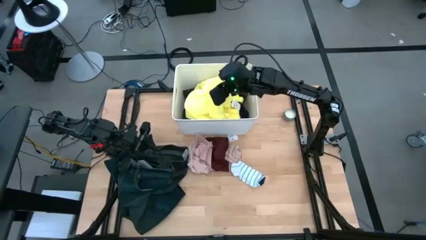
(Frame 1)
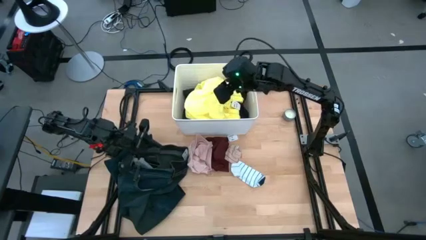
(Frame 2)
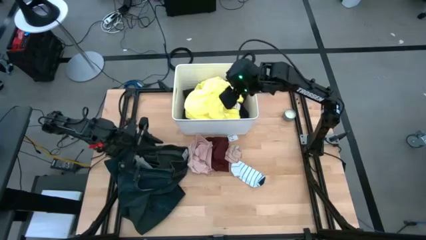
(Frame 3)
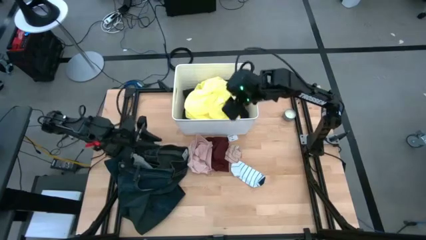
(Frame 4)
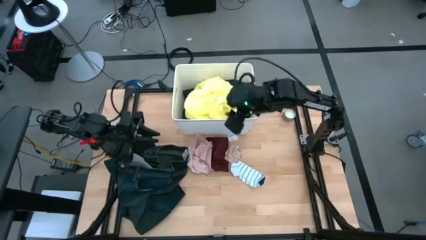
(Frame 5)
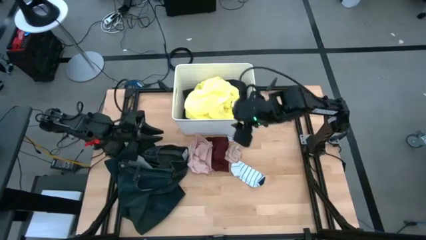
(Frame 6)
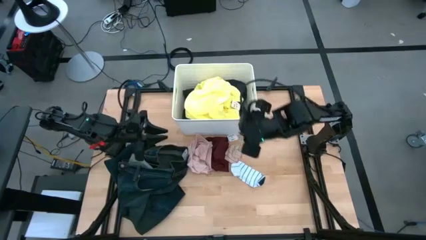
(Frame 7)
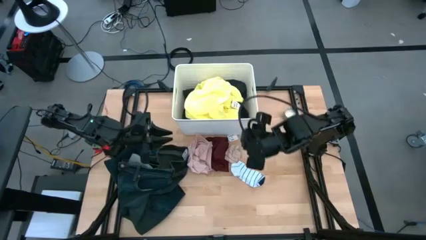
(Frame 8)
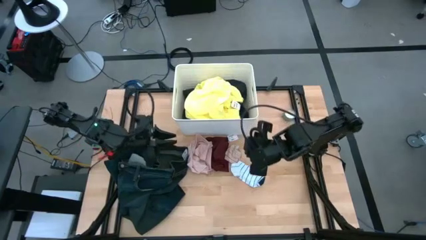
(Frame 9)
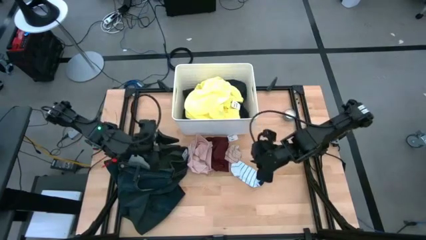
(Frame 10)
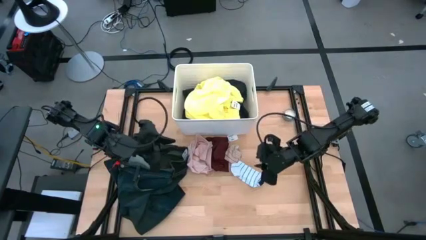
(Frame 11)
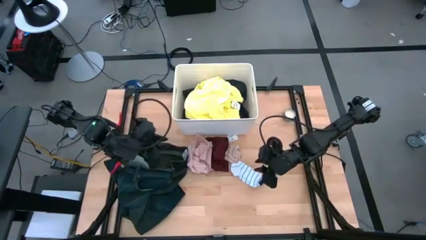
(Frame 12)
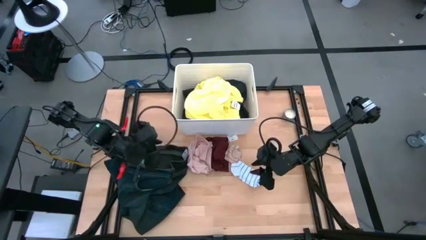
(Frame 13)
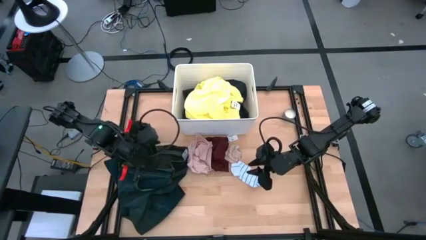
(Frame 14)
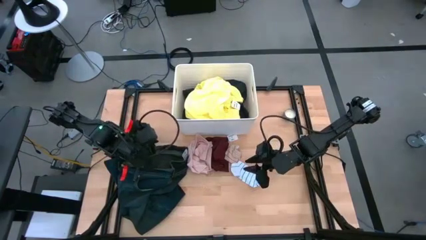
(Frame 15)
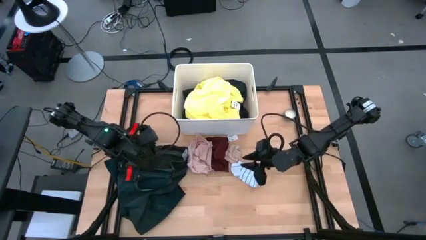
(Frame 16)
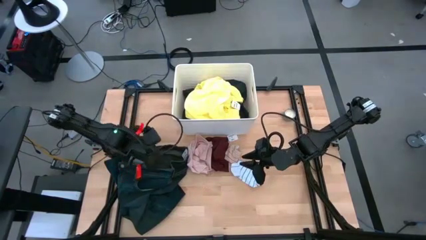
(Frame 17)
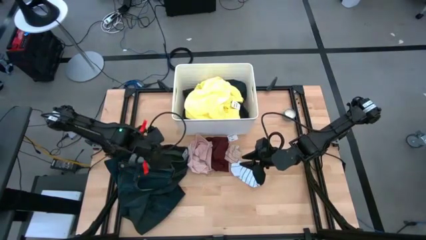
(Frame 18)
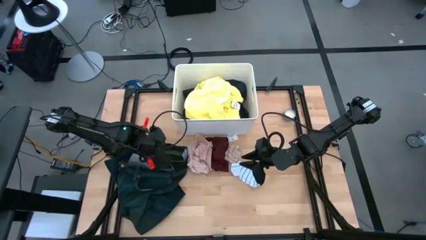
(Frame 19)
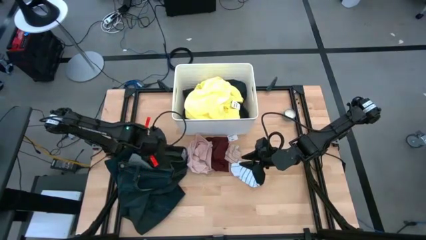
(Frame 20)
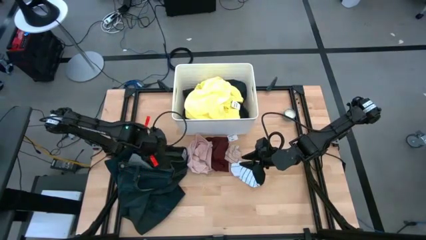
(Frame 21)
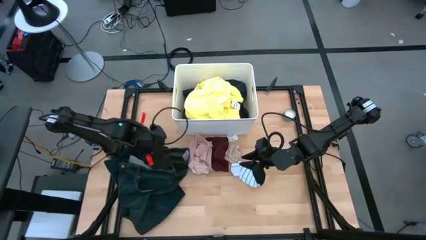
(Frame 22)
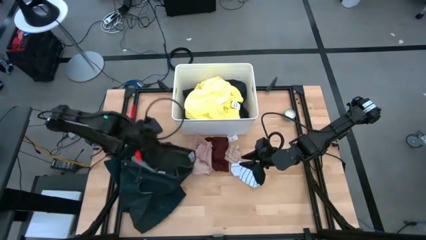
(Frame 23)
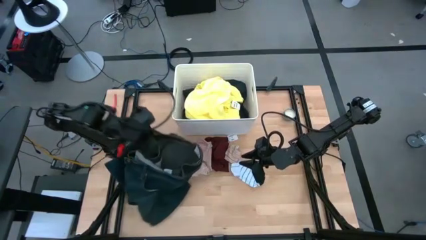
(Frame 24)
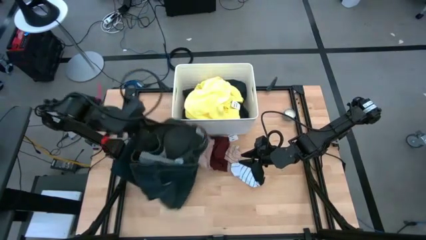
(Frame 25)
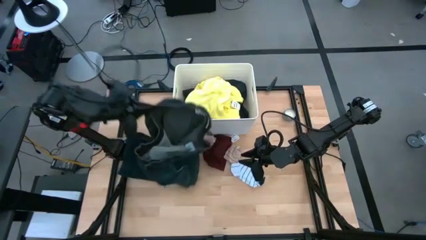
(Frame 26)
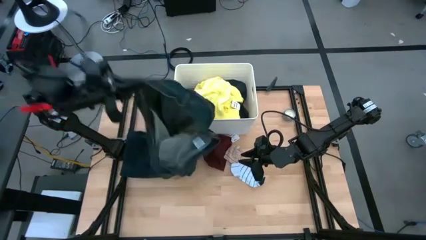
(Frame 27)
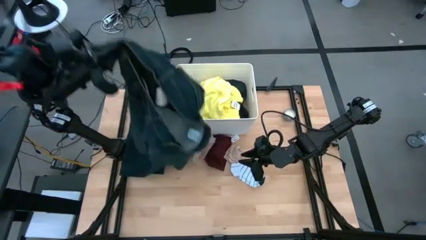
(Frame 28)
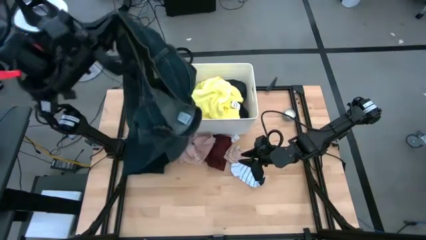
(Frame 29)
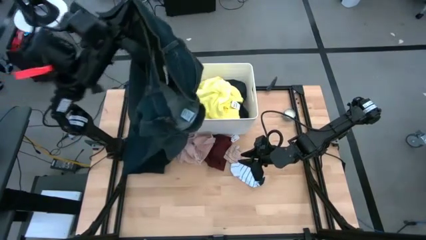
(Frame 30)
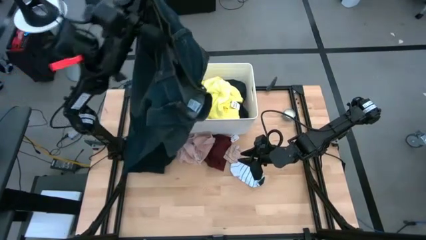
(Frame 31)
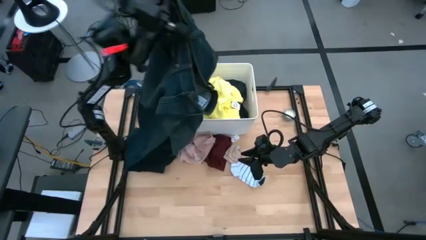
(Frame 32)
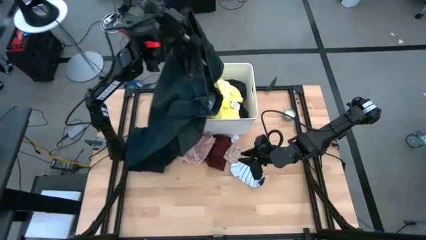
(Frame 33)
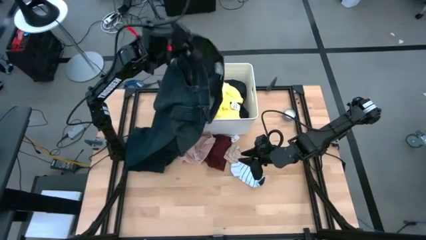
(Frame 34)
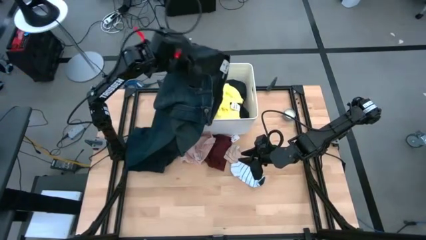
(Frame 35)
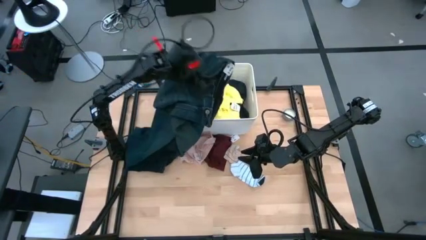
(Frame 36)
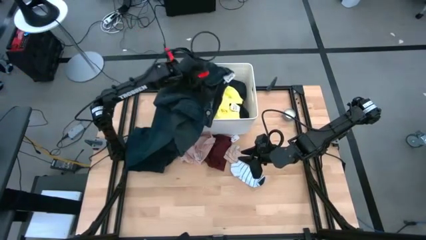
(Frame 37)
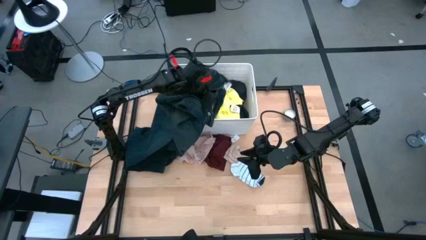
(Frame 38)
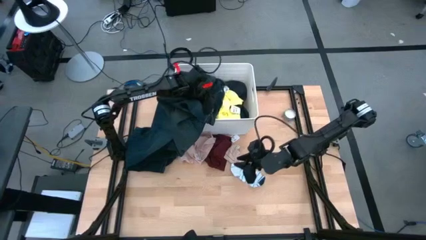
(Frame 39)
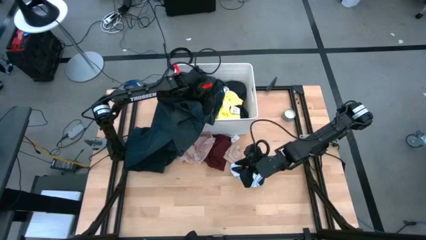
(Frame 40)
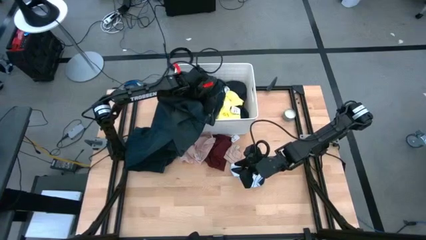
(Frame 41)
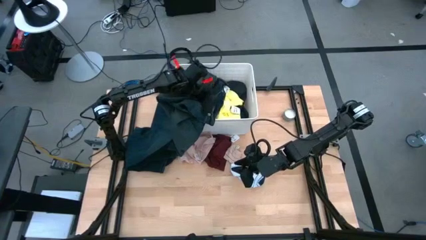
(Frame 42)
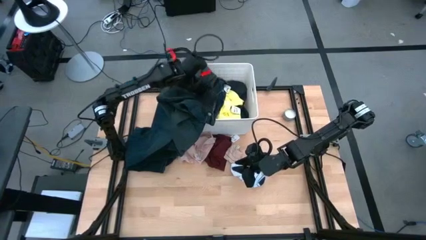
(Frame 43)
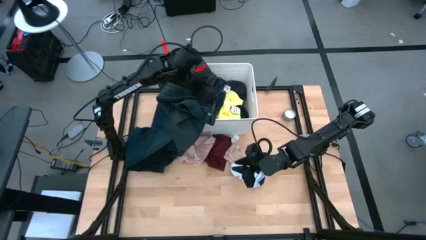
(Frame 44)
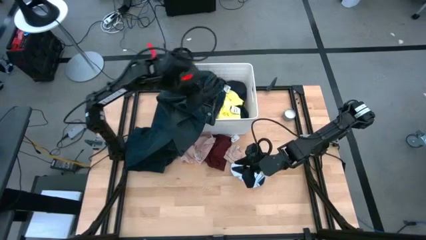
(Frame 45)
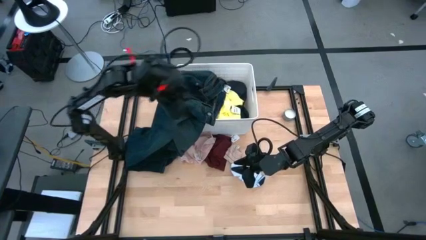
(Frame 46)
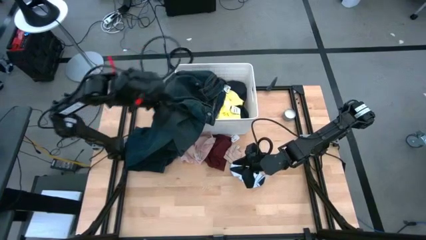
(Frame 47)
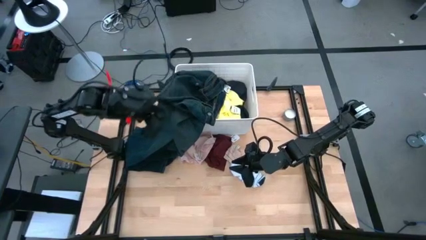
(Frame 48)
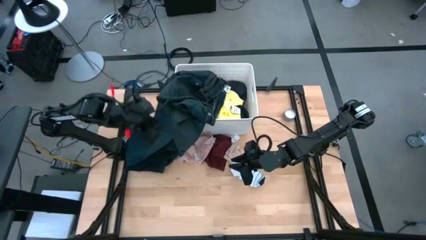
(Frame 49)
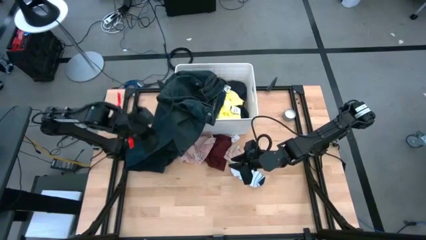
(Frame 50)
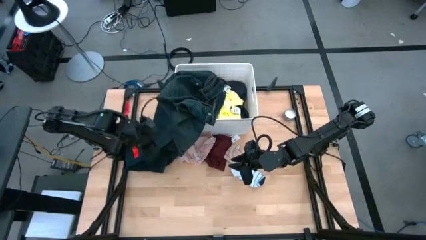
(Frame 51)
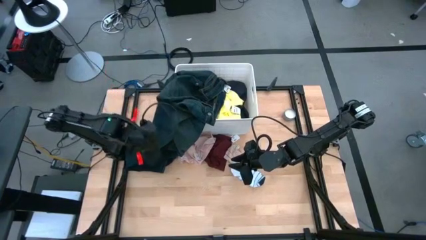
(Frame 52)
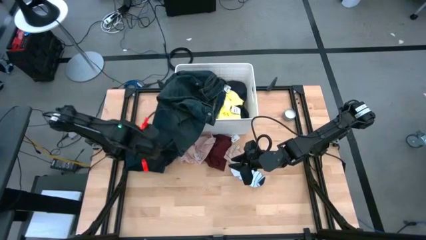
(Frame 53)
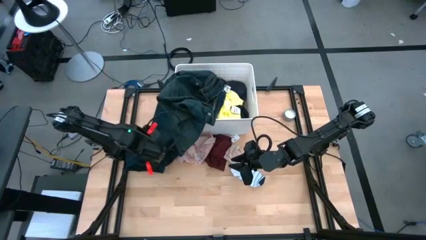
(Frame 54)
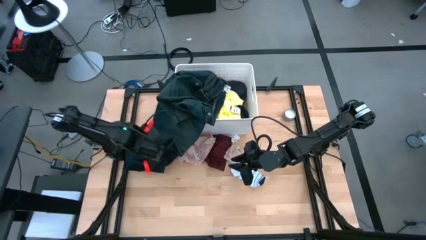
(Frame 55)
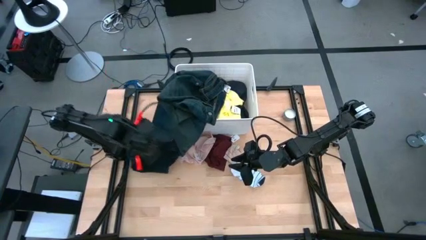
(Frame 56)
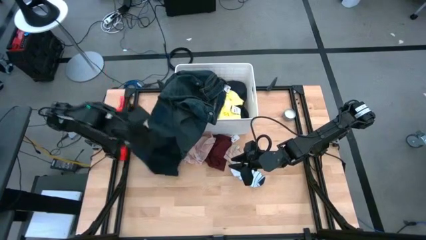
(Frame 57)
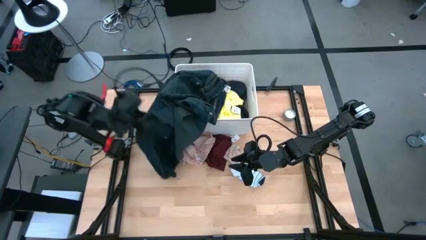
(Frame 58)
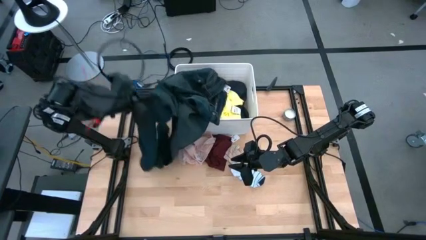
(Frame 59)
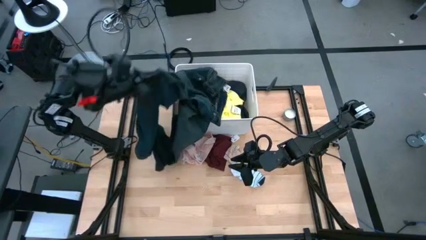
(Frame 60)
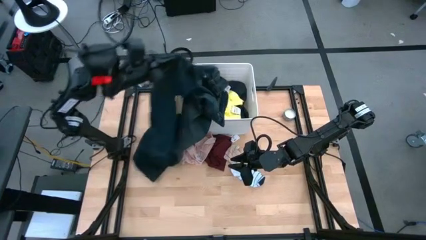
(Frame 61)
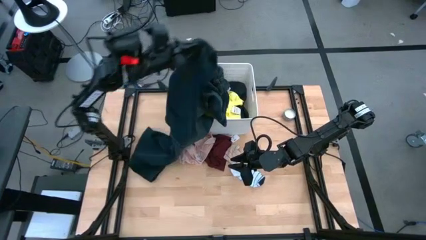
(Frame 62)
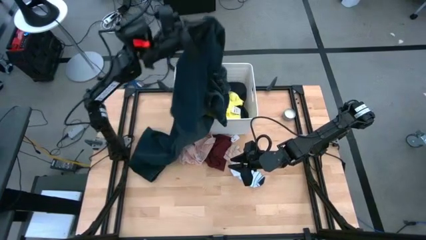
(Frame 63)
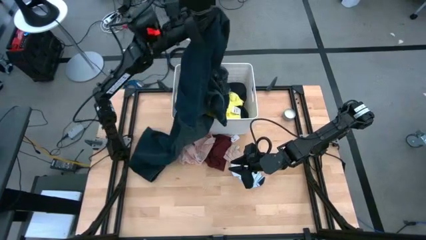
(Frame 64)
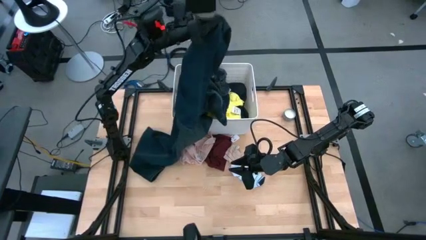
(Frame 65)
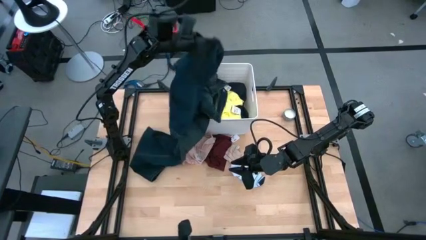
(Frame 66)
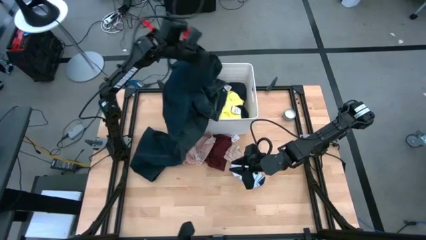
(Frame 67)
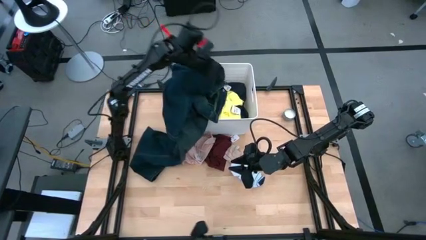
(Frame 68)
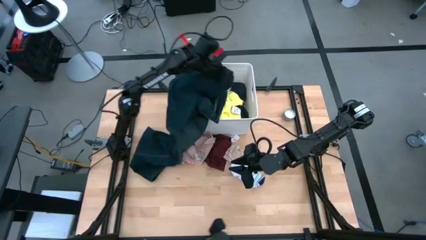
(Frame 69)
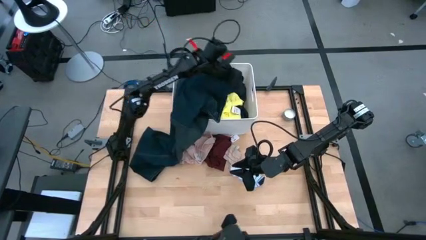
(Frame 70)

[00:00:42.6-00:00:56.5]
Task: Sort clothes
Put the dark blue jeans into the white bin

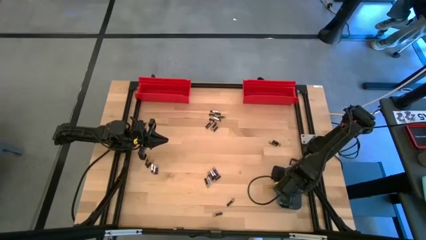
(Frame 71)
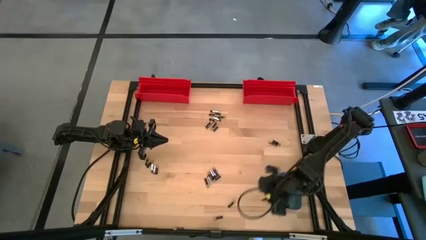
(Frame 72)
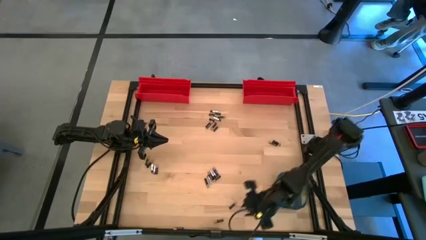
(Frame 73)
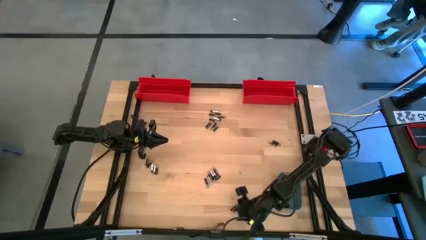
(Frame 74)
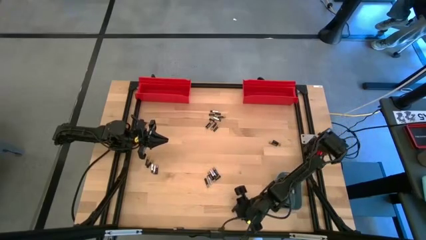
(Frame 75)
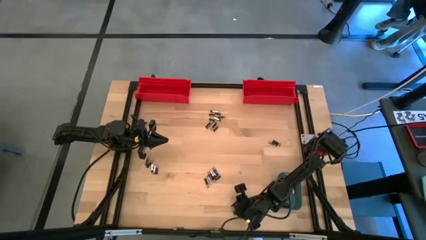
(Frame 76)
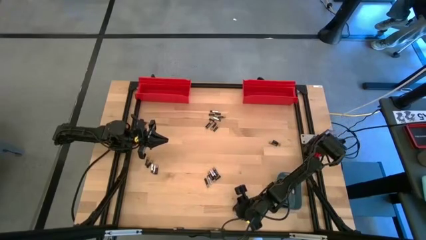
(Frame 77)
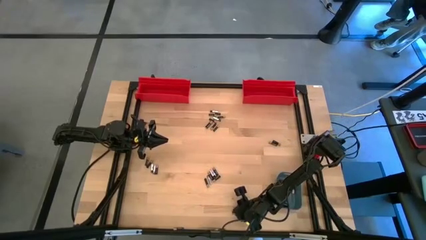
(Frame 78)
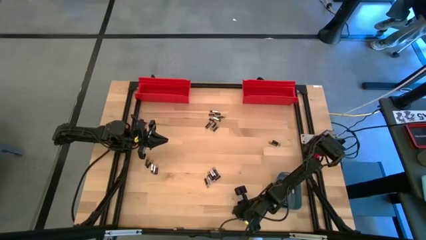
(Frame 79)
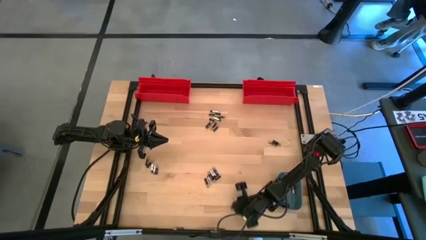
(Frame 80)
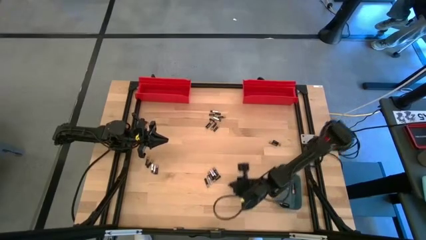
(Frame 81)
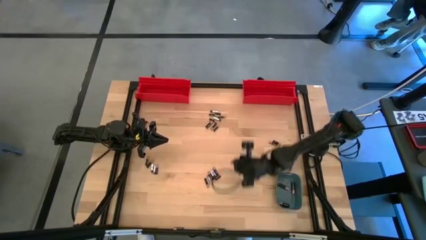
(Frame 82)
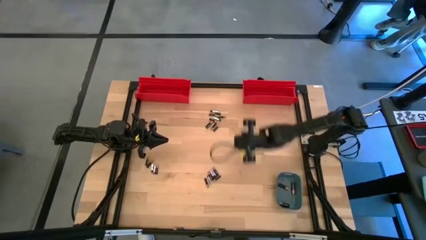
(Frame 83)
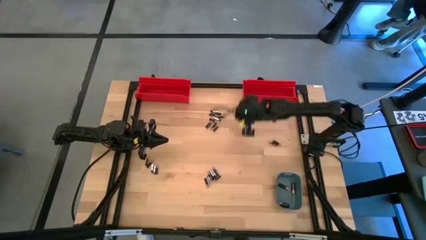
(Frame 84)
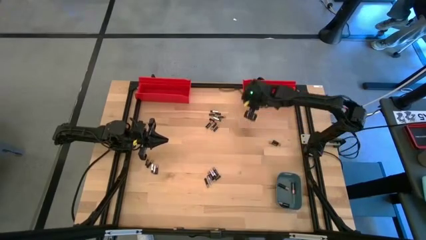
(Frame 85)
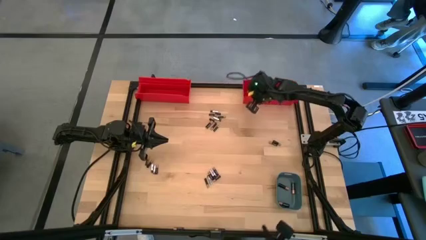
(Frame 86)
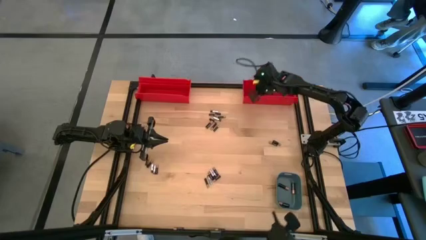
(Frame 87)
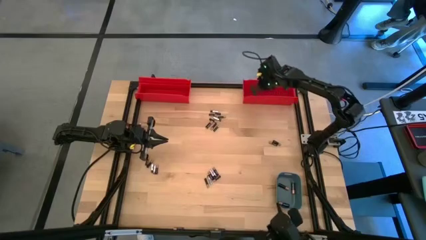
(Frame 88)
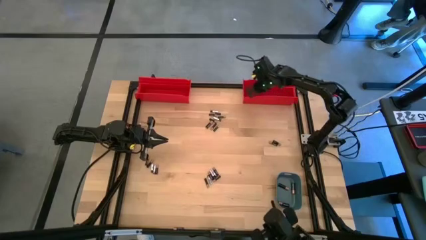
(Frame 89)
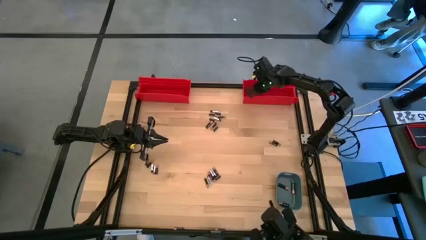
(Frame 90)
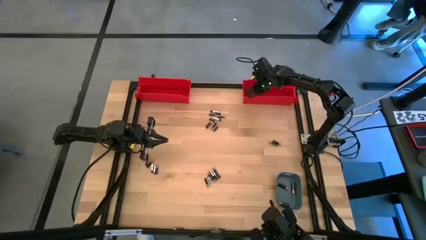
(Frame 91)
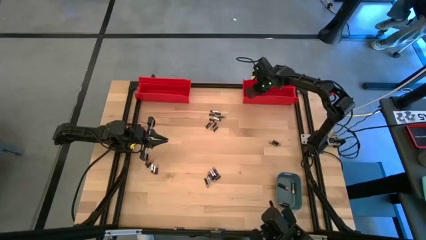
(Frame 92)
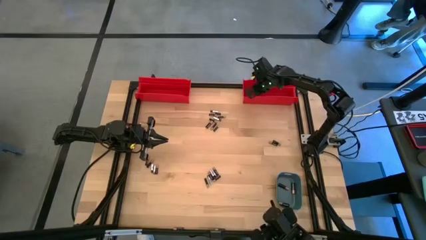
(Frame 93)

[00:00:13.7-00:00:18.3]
Task: Sort batteries
Put the small black battery into the right red bin
